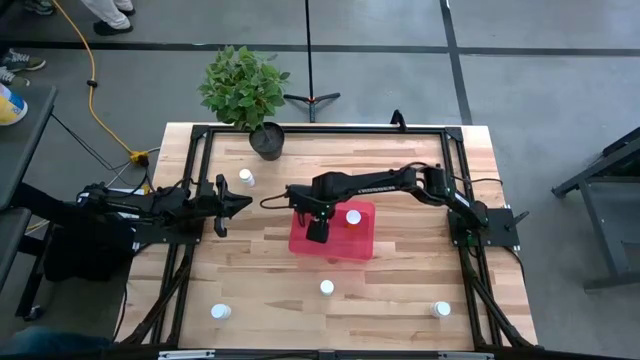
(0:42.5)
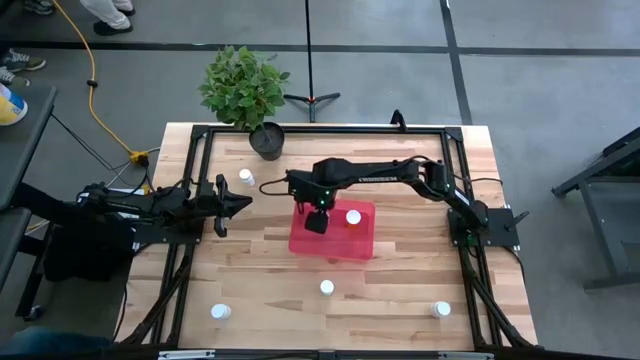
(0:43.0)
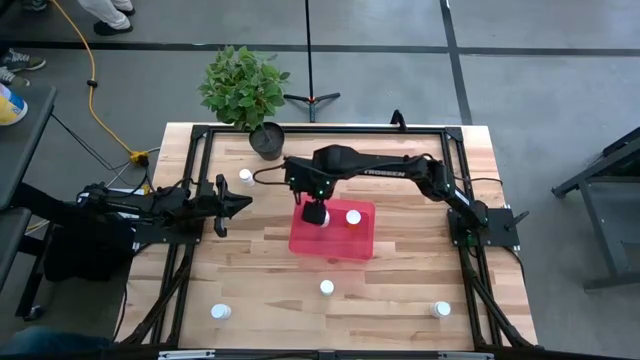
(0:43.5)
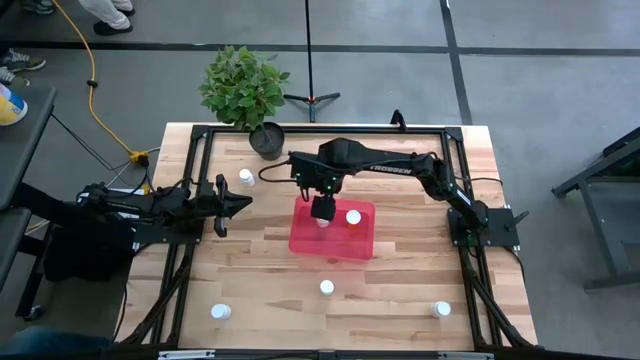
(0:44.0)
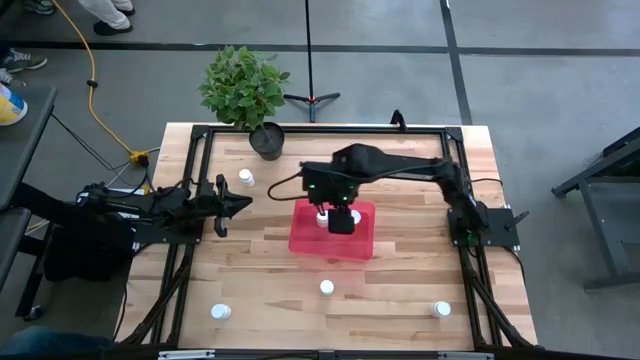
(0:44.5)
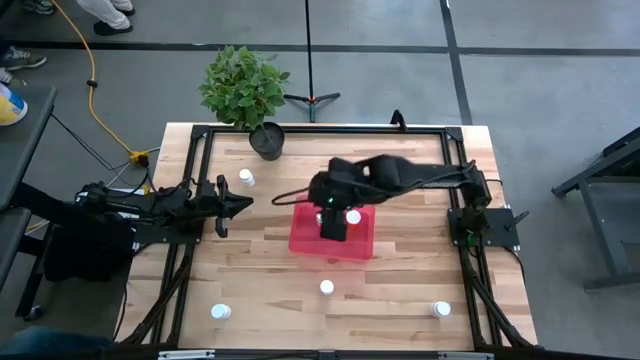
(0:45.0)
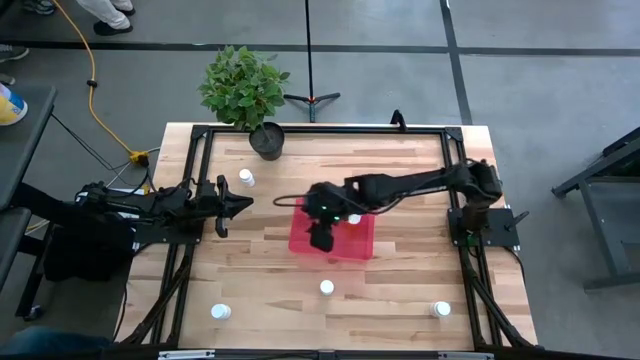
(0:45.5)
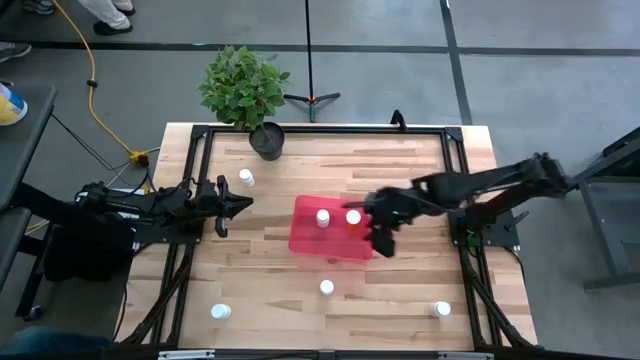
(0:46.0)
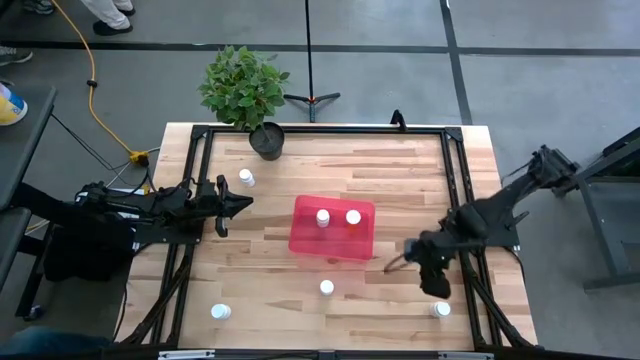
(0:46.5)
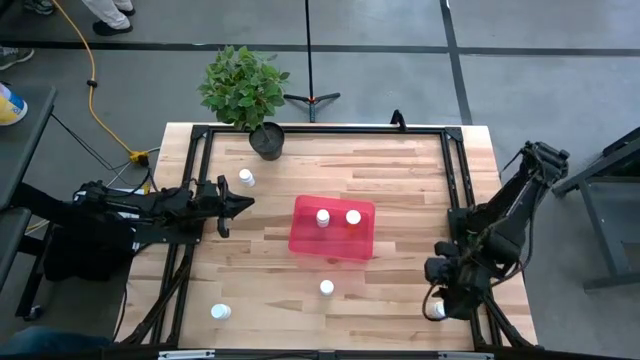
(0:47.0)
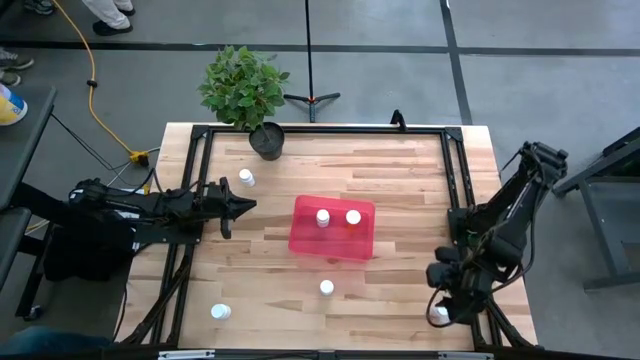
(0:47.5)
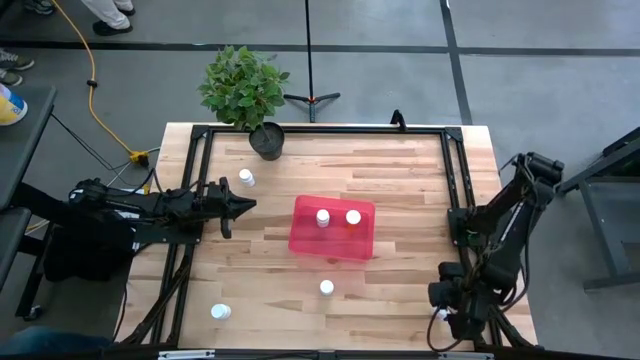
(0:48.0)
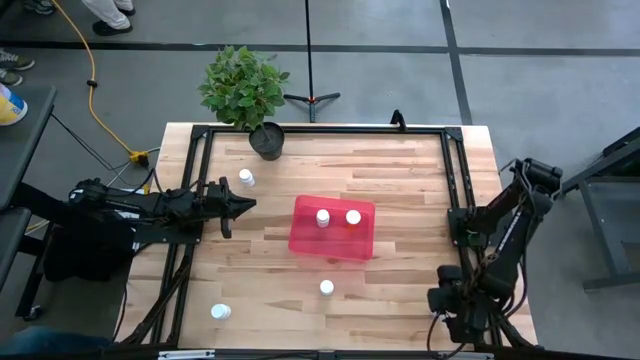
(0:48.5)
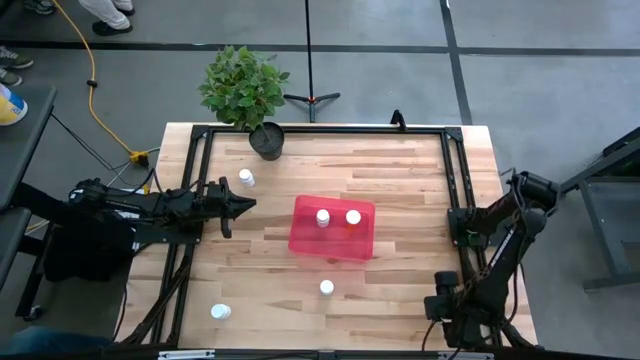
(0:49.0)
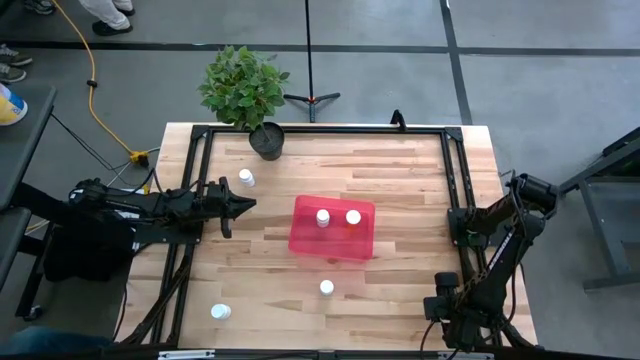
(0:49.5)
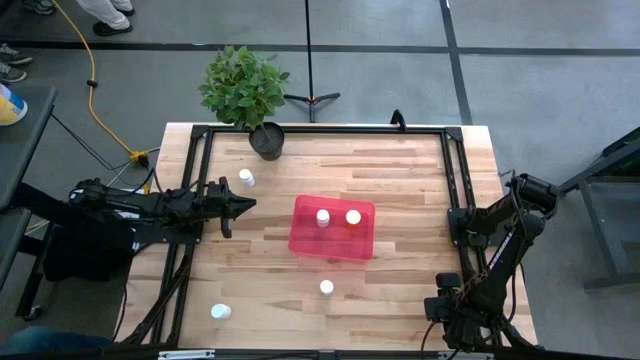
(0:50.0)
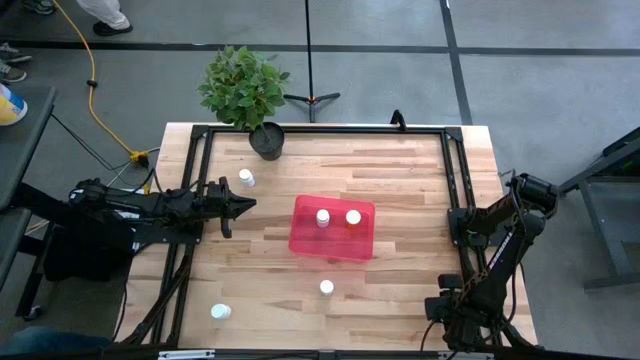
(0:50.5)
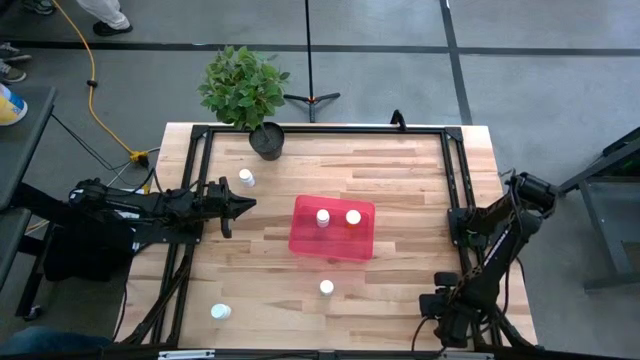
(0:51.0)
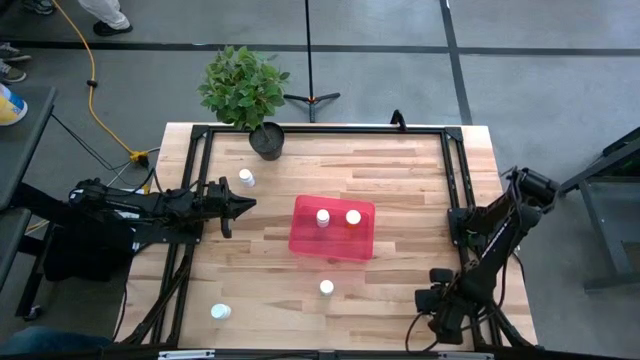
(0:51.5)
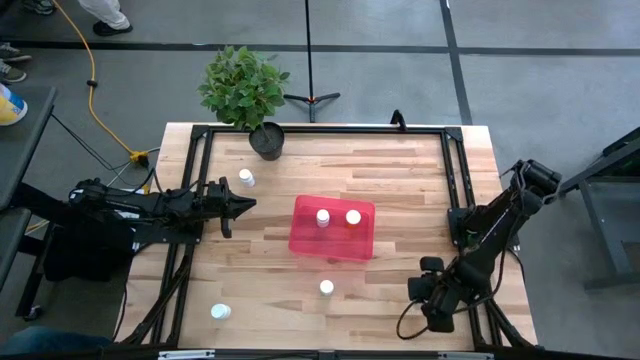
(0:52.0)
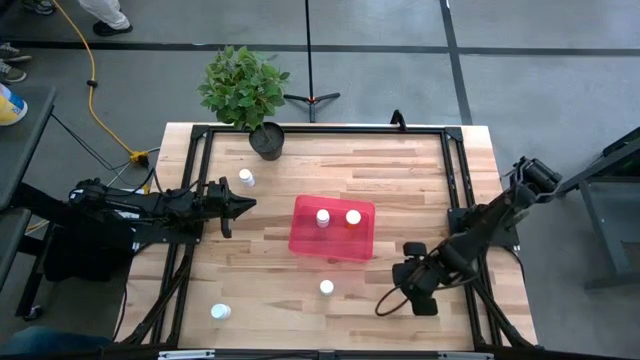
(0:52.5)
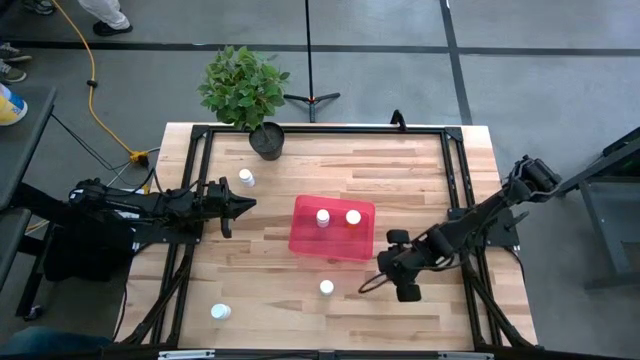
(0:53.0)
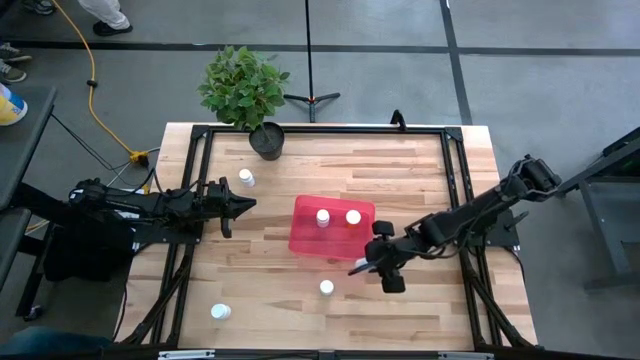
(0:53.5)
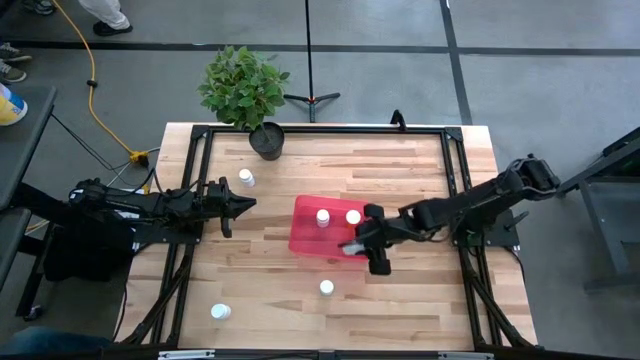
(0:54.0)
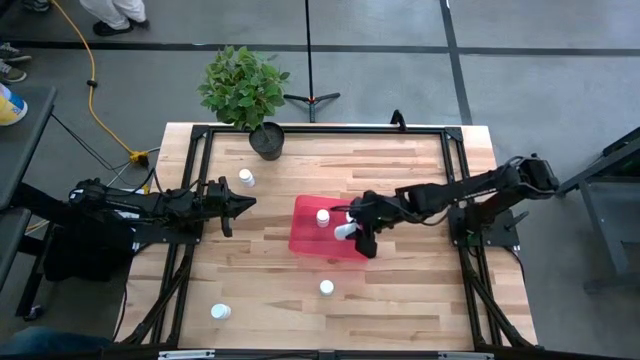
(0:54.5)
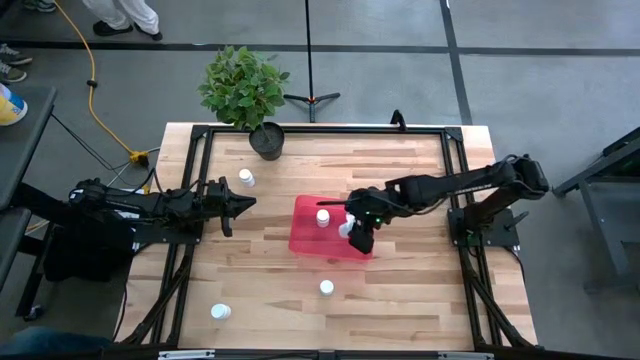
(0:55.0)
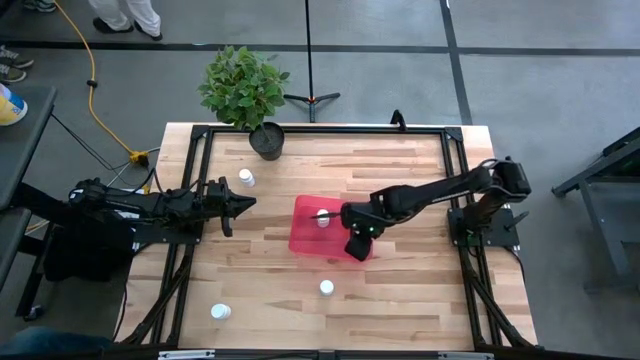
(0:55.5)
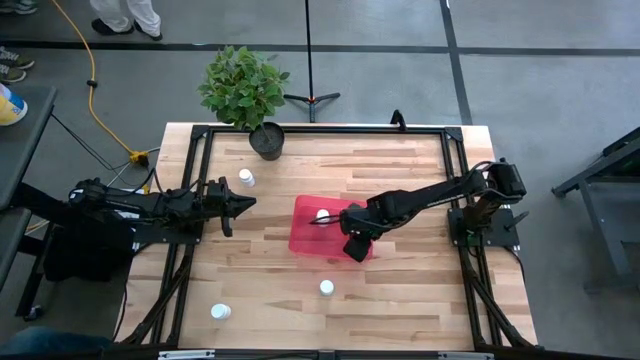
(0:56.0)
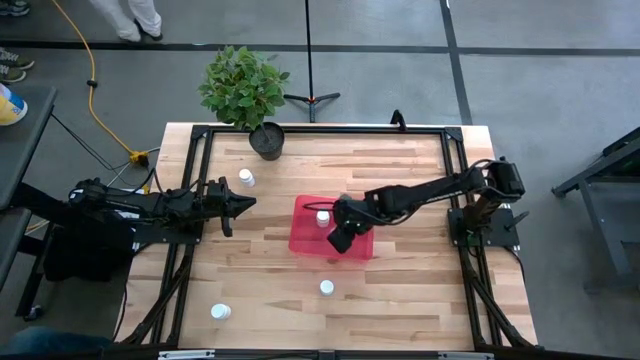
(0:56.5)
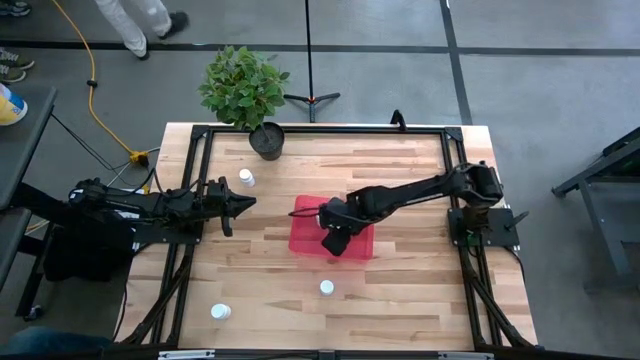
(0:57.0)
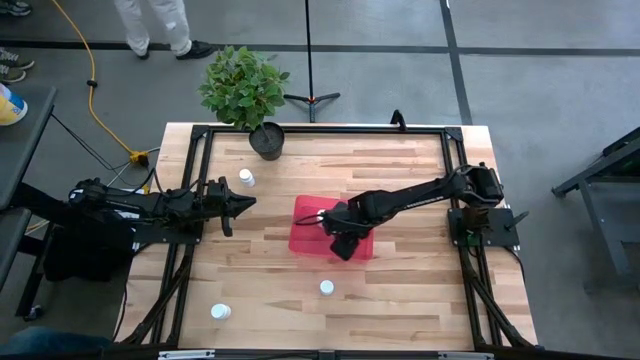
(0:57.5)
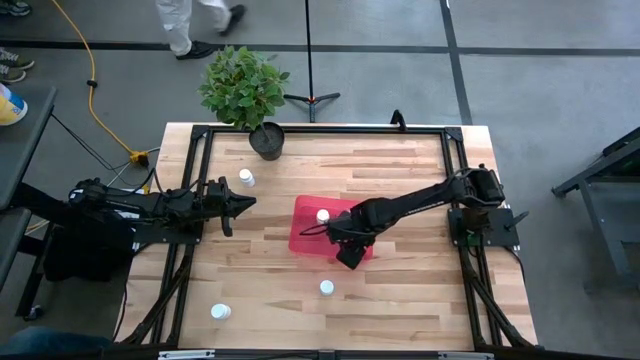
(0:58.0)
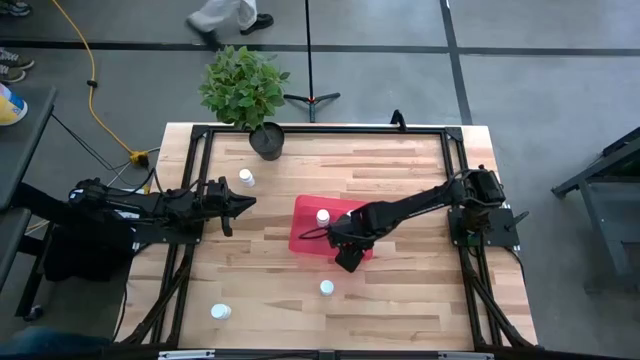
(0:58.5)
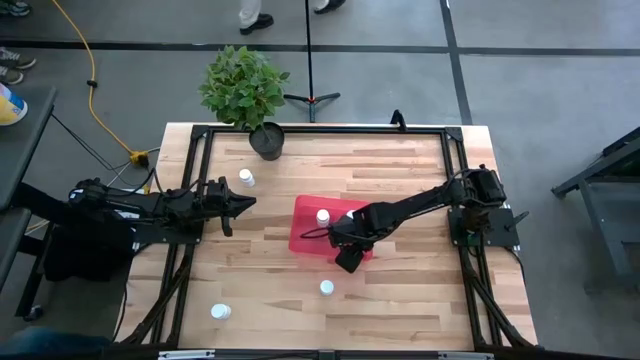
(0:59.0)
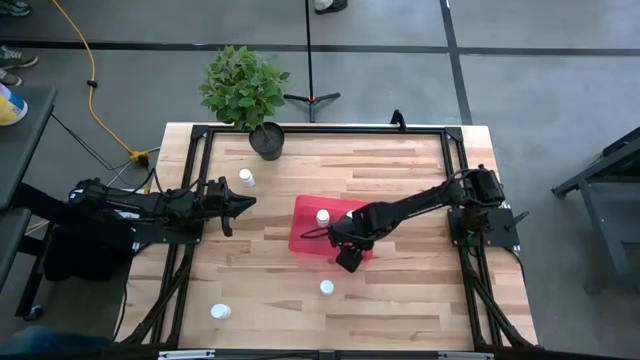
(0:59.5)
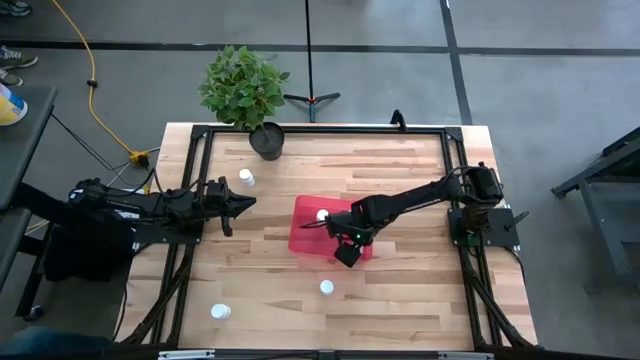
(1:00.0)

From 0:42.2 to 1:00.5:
Task: Pick and place pill bottles into a basket
Put the white medicine bottle into the bin

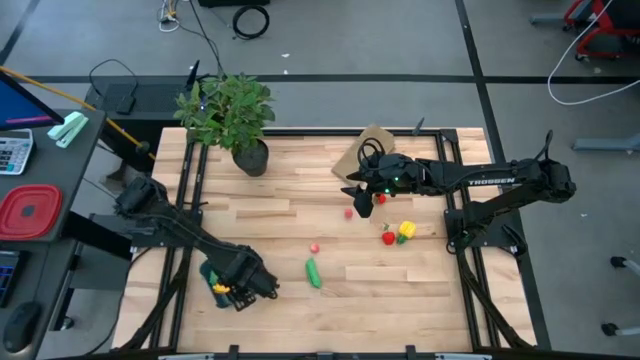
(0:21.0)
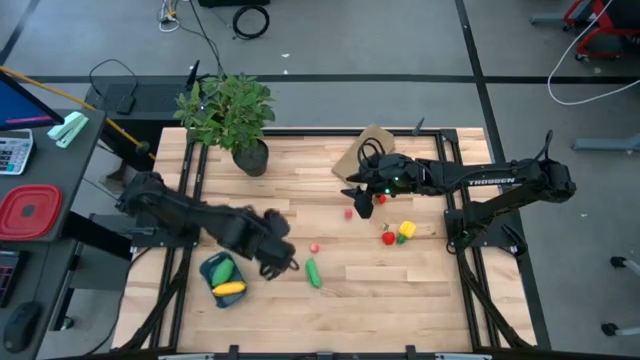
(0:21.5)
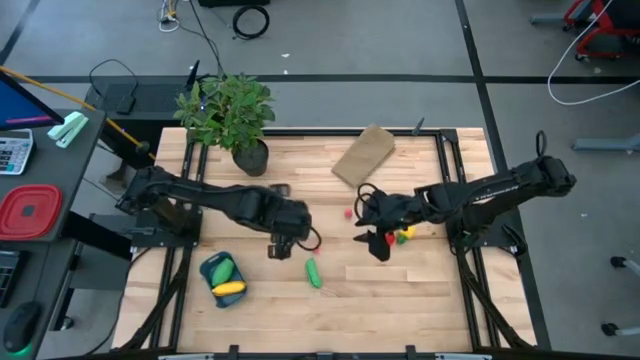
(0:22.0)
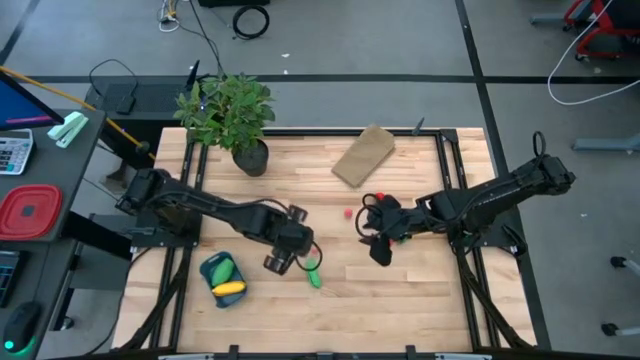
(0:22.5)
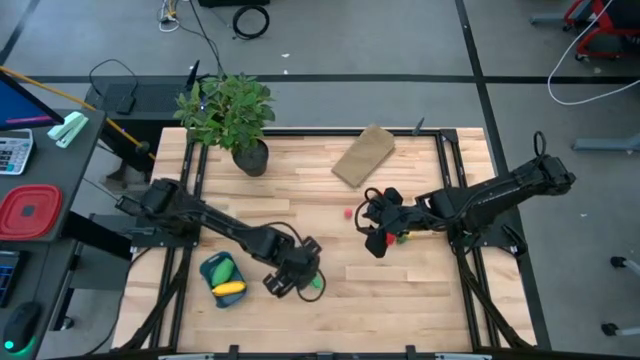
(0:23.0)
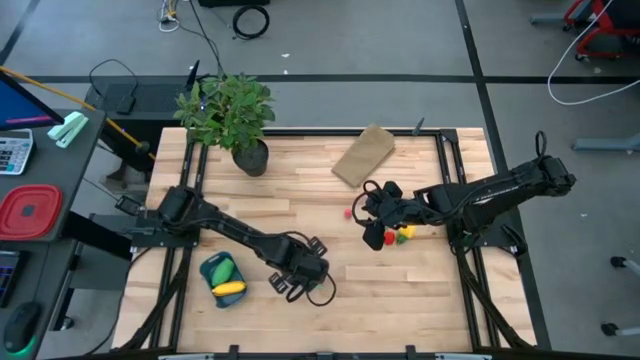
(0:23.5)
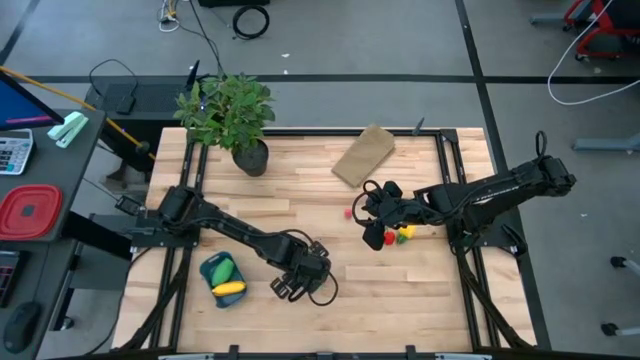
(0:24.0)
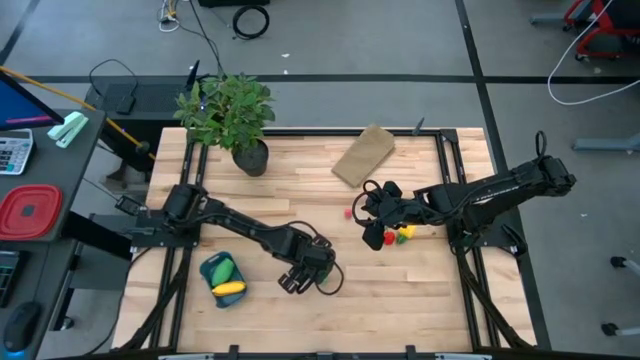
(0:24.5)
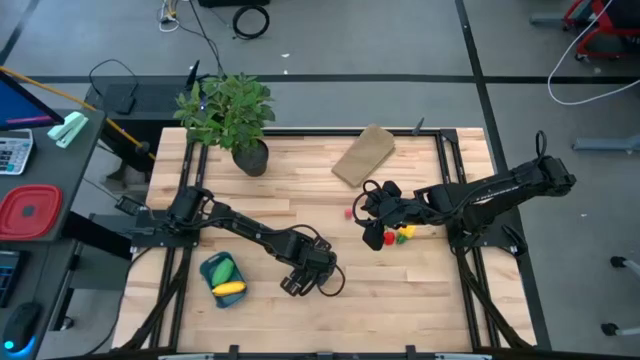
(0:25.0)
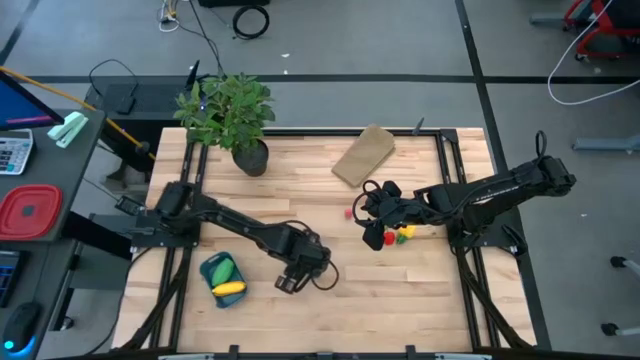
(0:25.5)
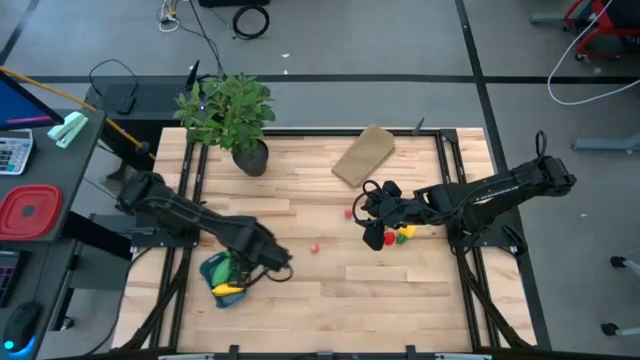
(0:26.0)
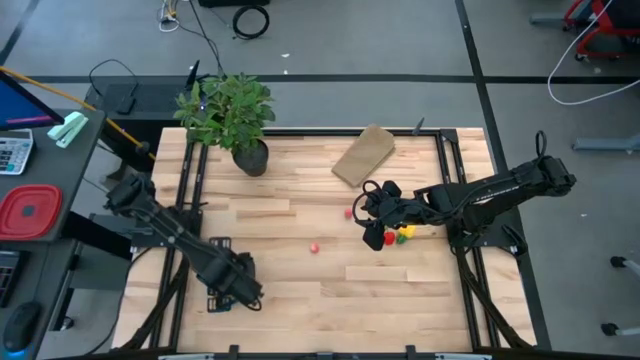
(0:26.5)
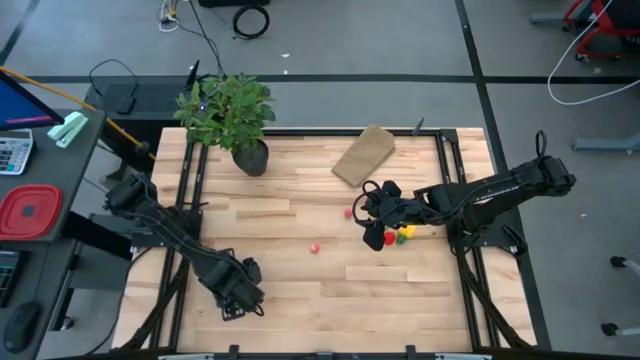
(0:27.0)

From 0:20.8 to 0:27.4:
Task: Pick and placing Produce into tupperware
Put the green pea into the blue bin
